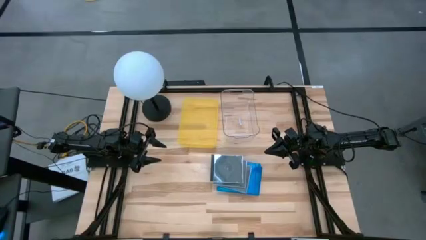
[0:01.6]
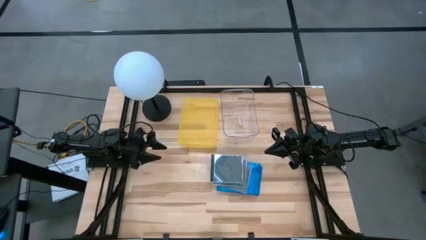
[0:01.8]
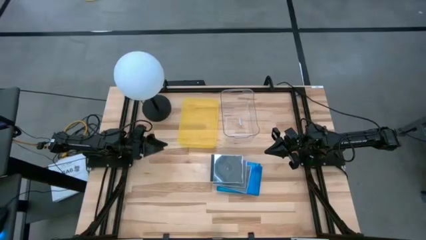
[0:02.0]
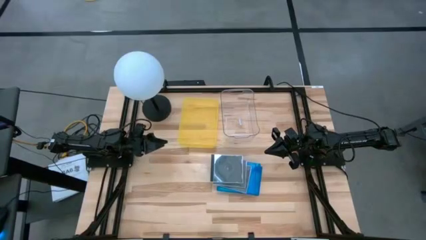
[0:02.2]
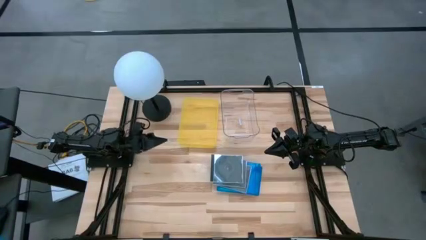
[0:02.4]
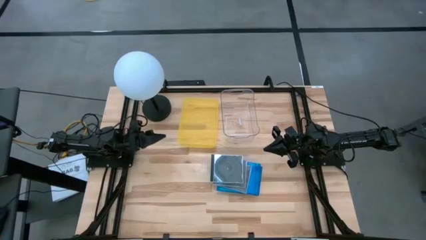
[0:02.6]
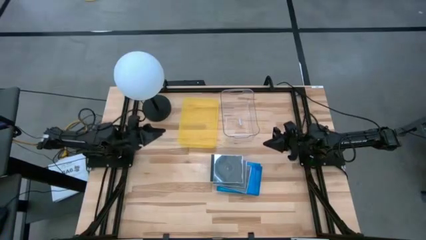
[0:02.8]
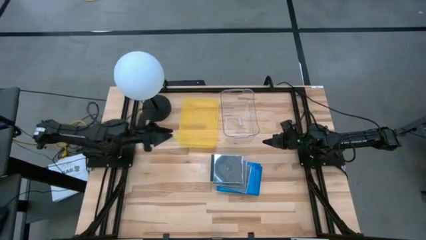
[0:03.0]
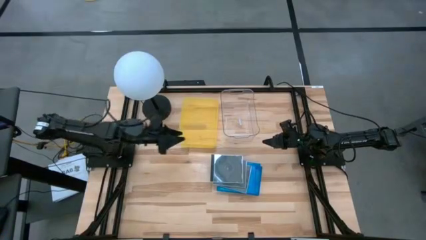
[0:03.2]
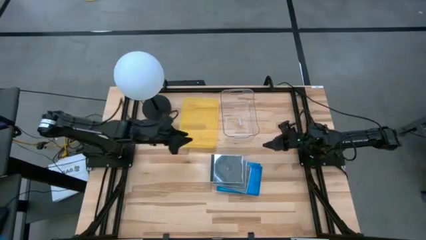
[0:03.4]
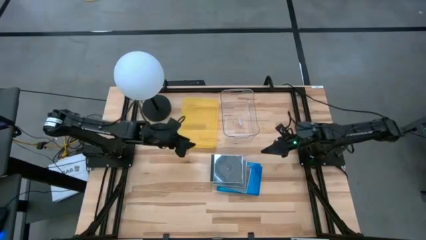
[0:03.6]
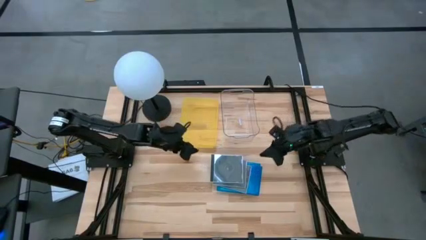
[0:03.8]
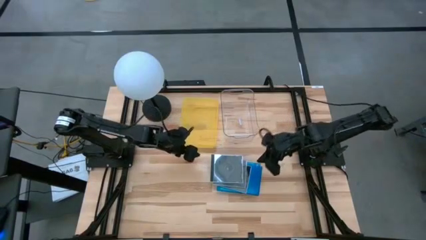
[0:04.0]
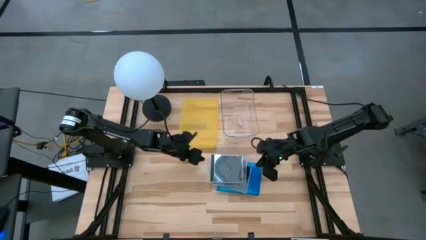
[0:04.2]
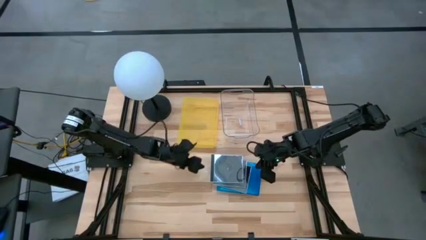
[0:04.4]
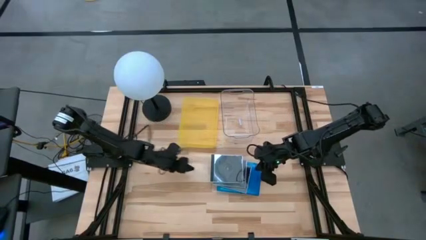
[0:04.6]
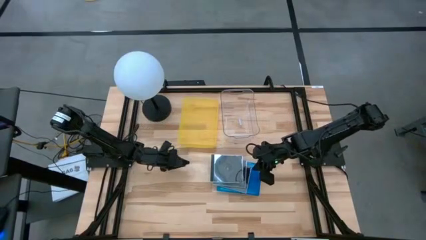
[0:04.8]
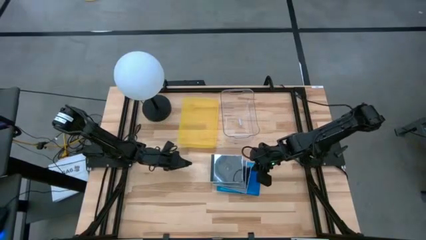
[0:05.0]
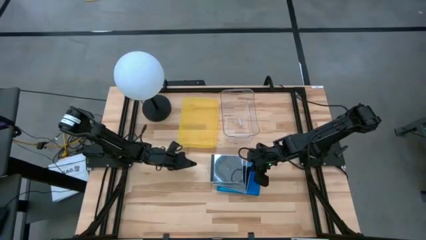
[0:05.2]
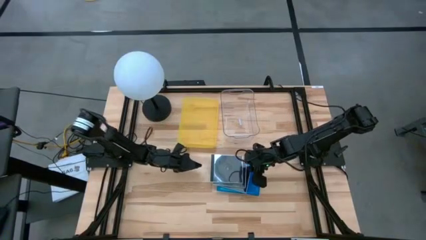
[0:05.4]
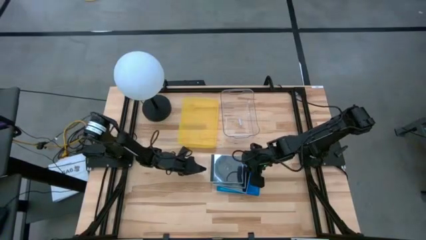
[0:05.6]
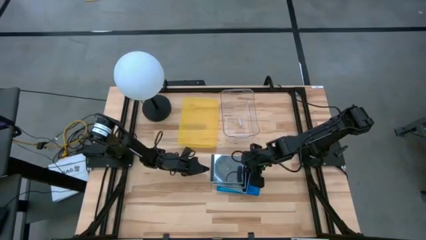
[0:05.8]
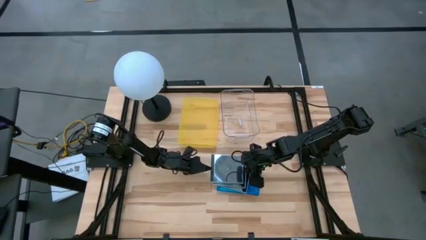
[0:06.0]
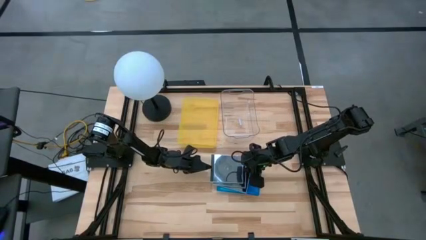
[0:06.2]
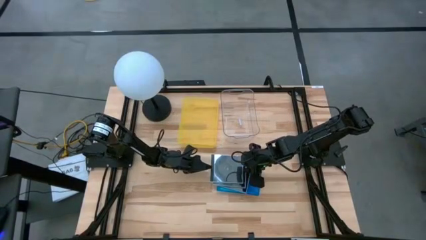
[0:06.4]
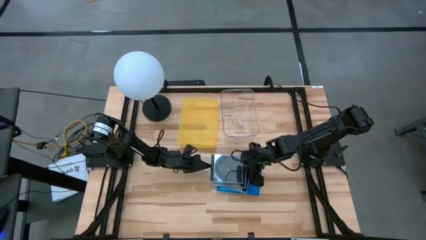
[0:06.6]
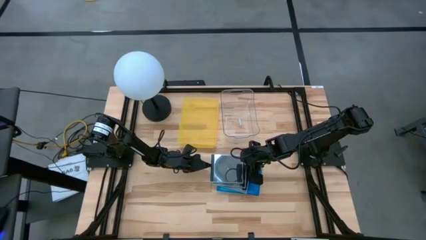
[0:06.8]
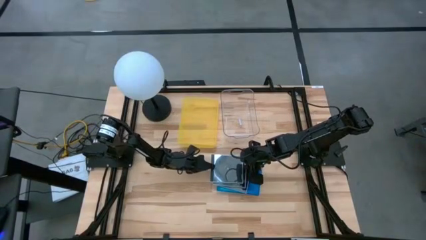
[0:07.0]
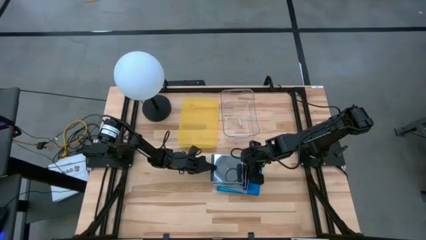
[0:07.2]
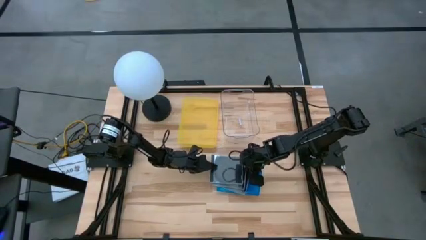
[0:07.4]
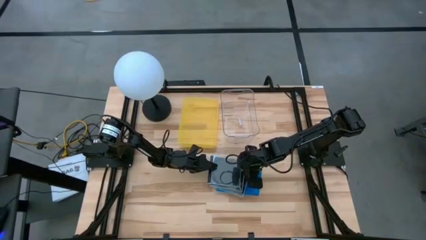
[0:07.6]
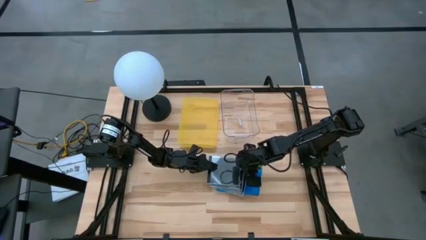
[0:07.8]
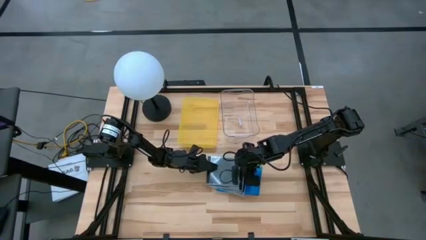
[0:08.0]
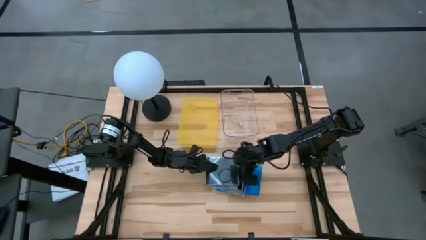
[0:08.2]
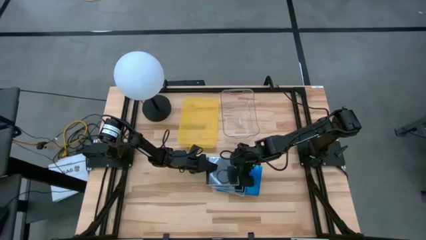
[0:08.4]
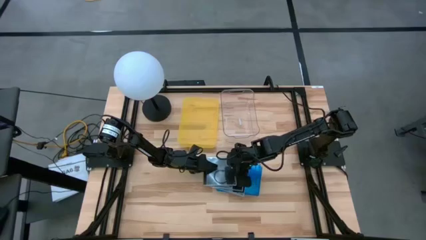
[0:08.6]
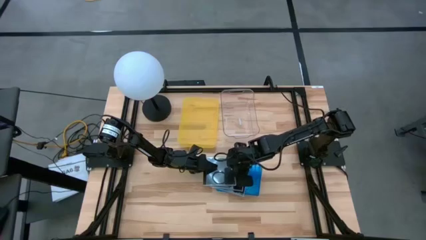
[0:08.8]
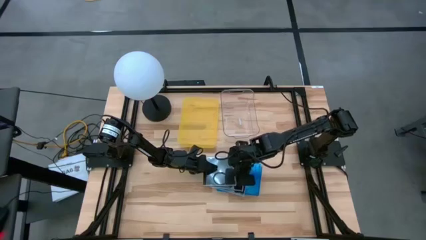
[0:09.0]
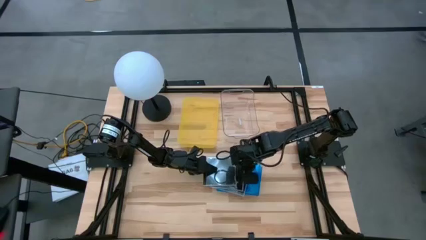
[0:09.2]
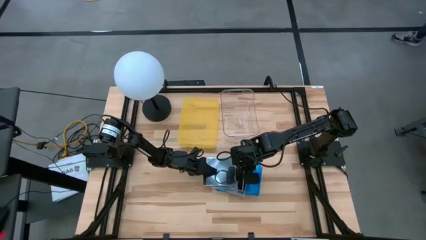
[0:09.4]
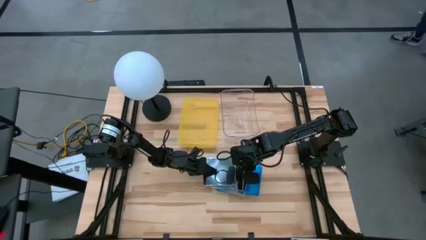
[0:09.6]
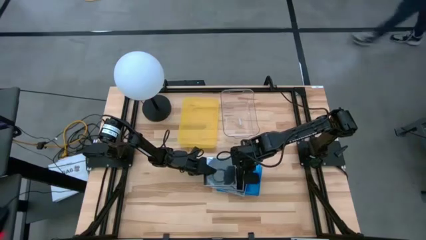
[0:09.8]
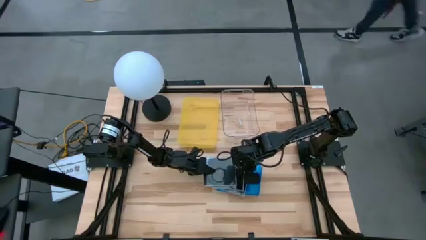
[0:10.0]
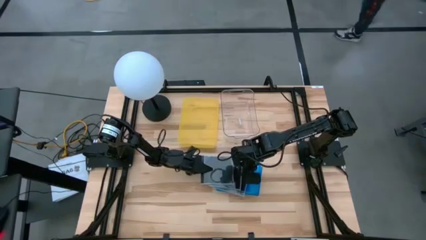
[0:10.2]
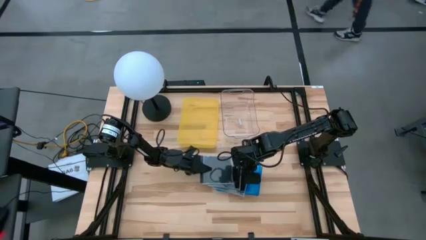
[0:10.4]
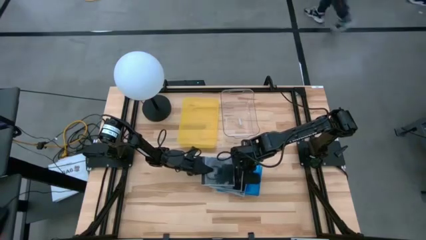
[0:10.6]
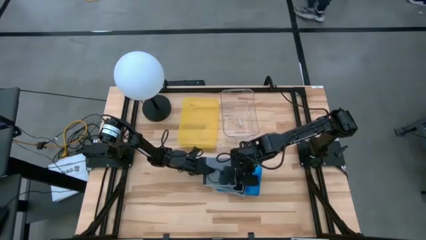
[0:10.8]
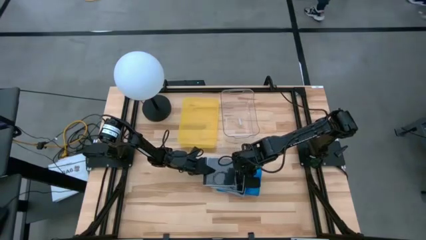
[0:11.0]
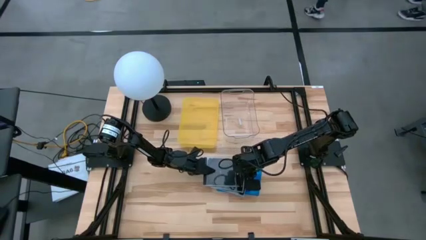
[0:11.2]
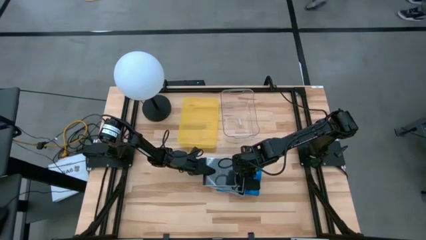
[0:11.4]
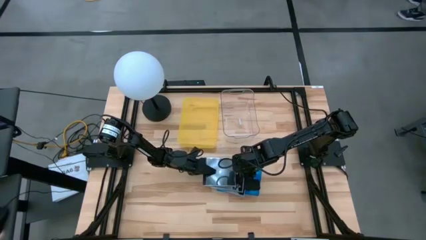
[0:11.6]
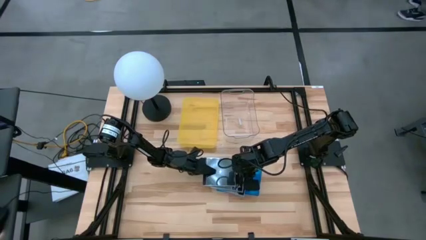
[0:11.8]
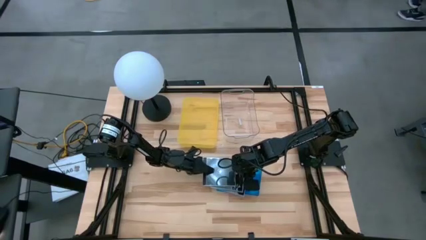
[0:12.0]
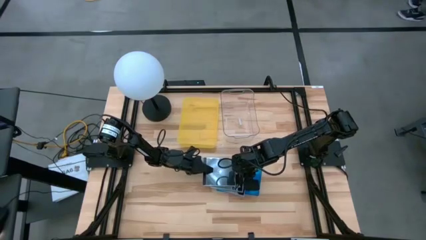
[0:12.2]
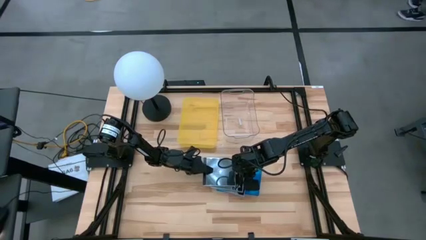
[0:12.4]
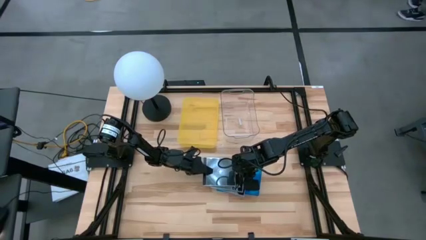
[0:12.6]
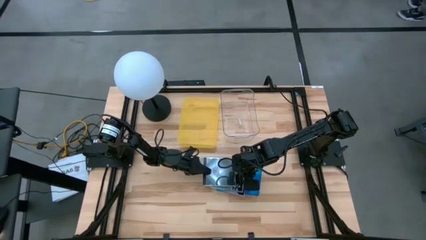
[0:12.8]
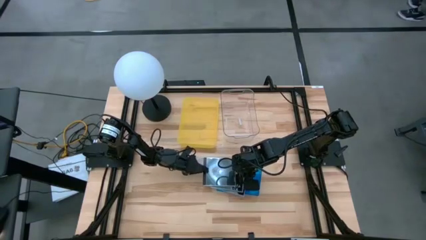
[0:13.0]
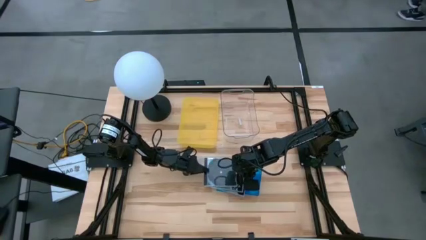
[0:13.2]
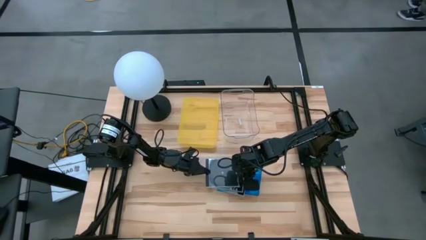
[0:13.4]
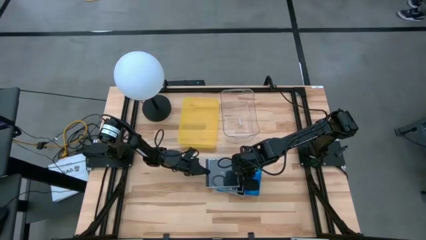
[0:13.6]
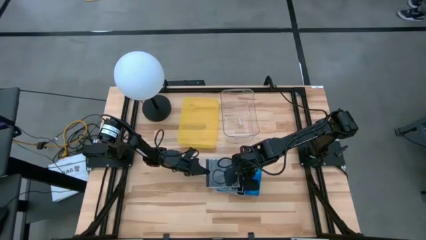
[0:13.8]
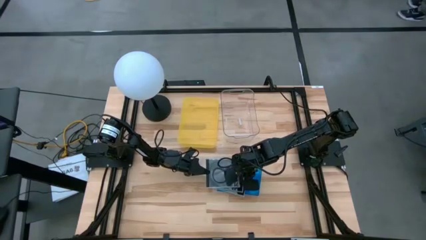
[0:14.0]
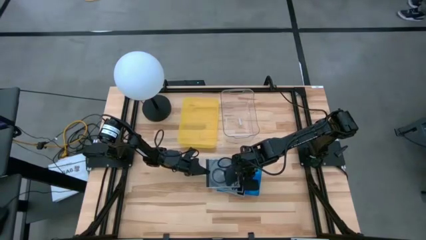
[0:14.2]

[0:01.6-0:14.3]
Task: Pick & place jewel cases by type
Put the black CD case into the transparent bin
